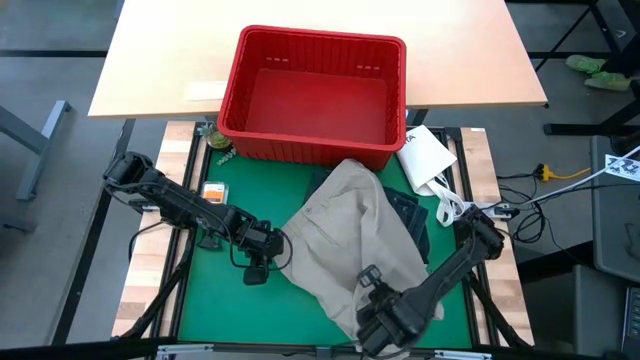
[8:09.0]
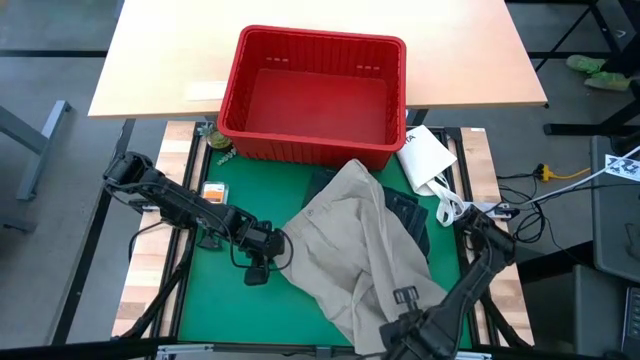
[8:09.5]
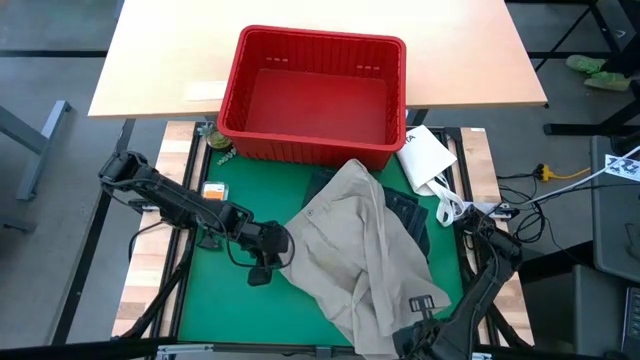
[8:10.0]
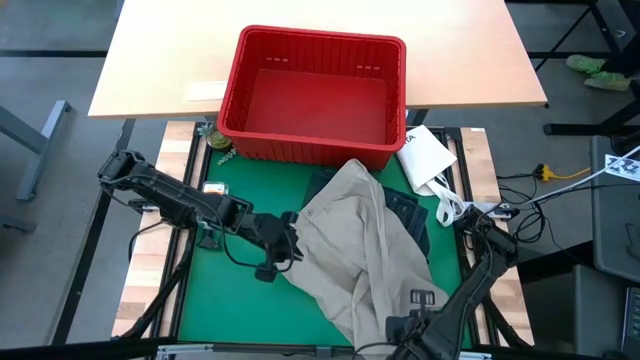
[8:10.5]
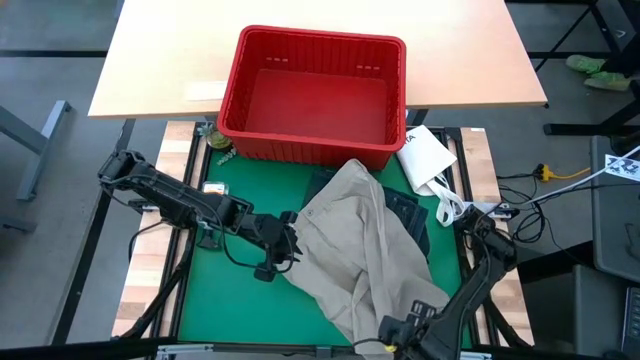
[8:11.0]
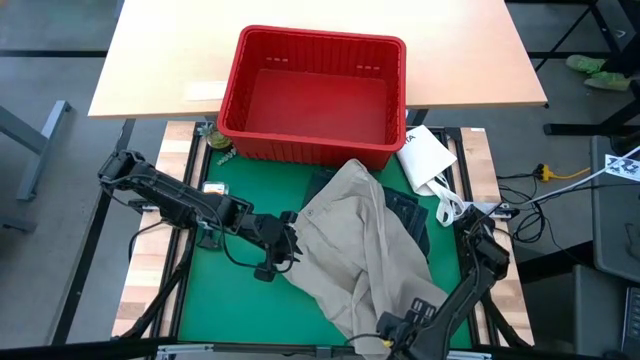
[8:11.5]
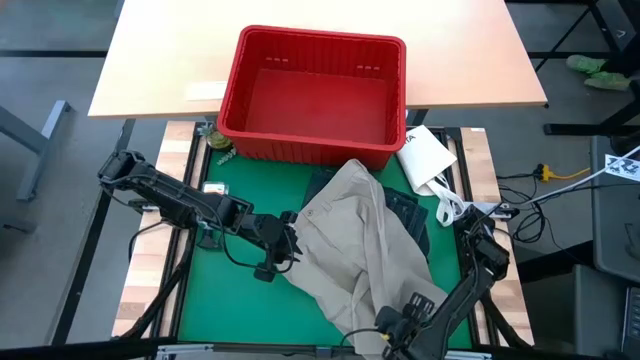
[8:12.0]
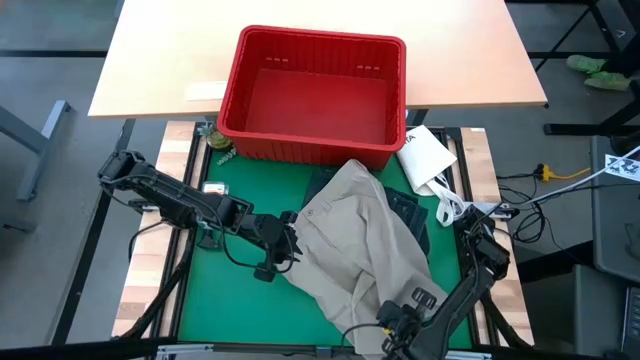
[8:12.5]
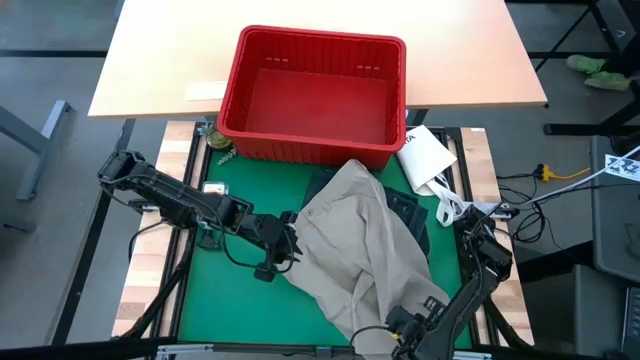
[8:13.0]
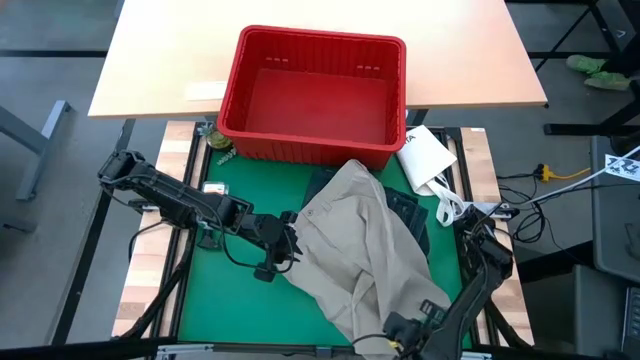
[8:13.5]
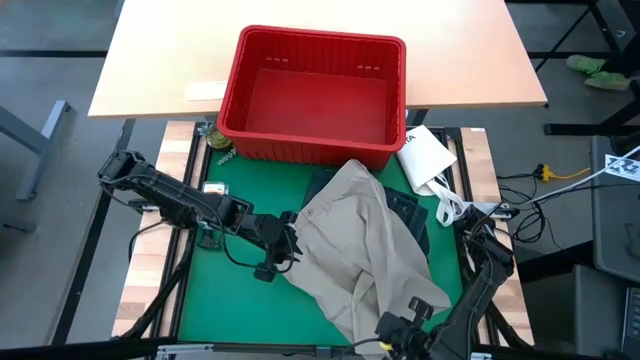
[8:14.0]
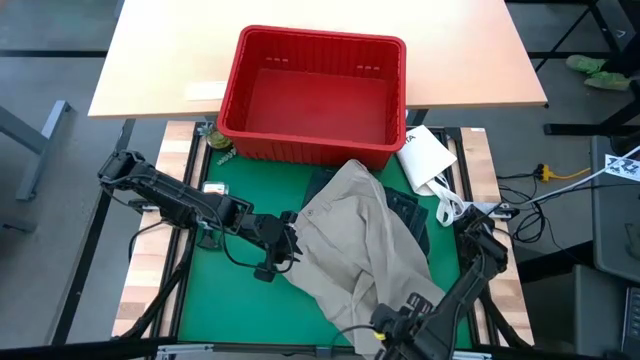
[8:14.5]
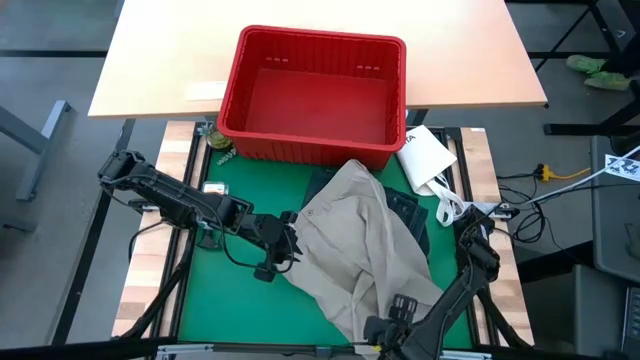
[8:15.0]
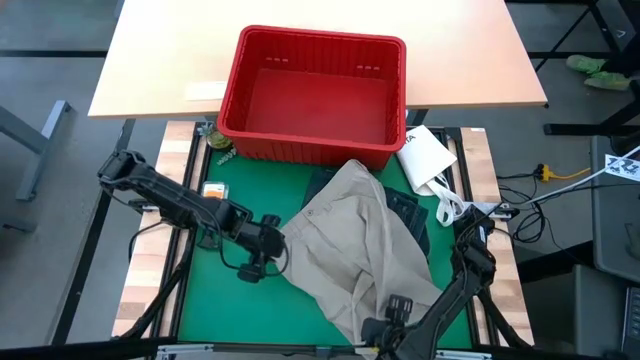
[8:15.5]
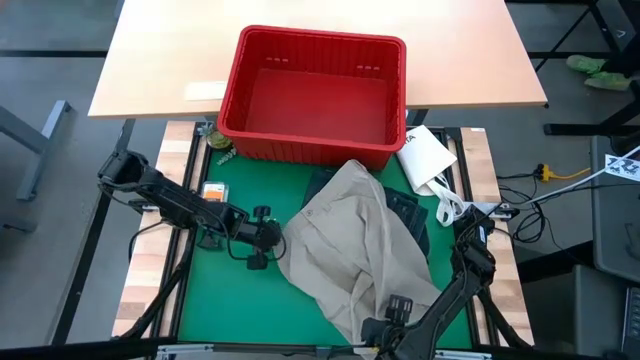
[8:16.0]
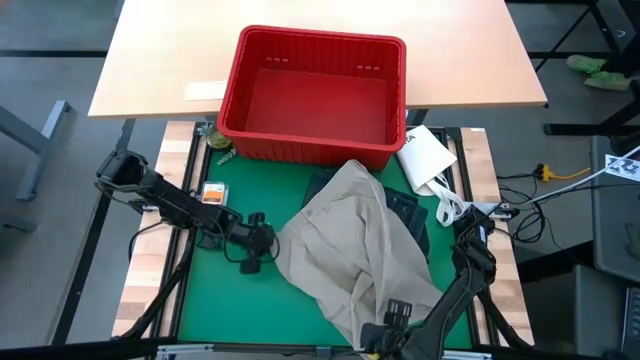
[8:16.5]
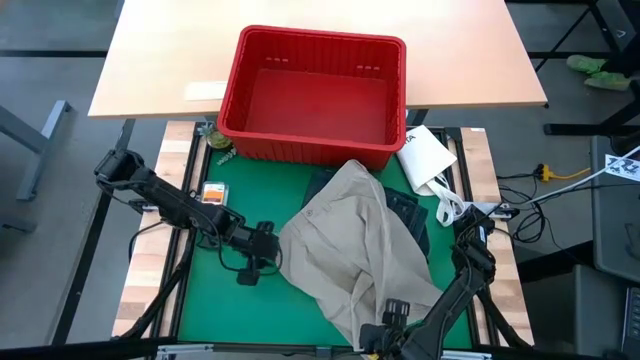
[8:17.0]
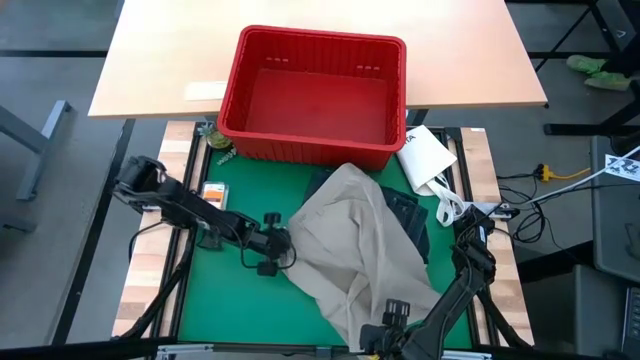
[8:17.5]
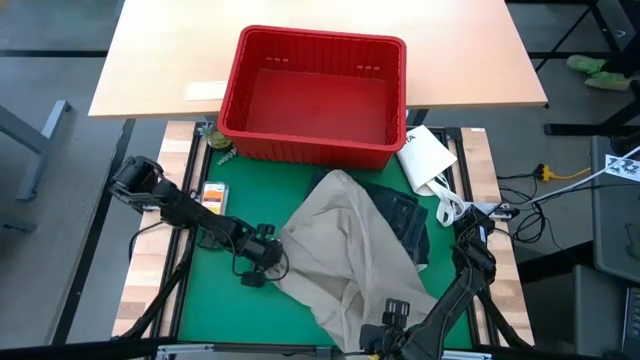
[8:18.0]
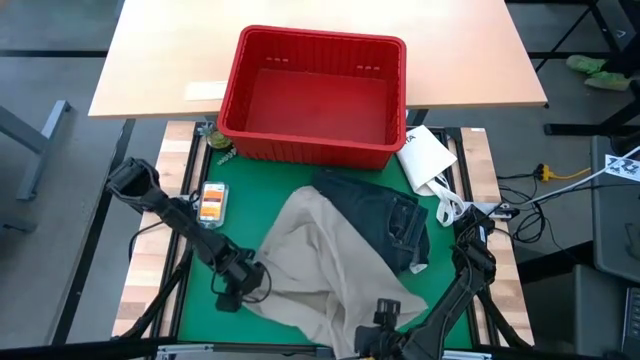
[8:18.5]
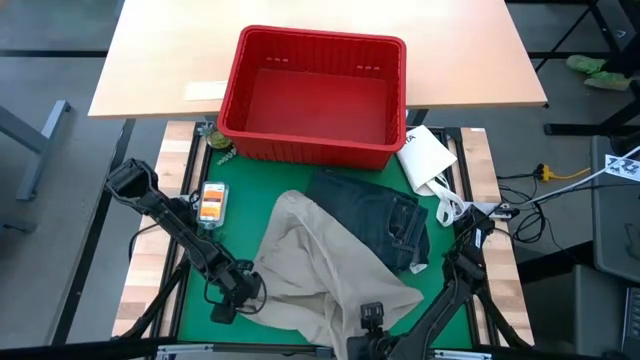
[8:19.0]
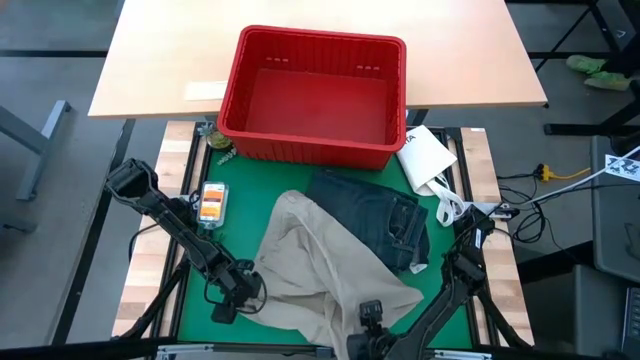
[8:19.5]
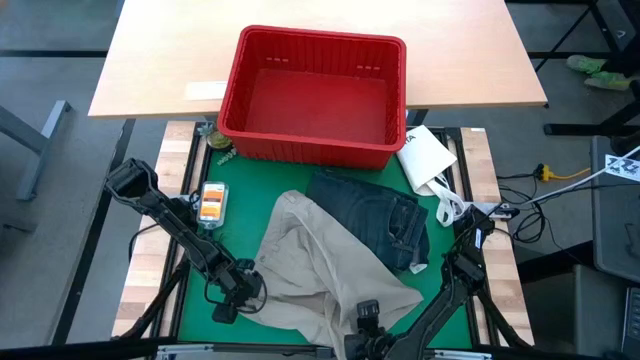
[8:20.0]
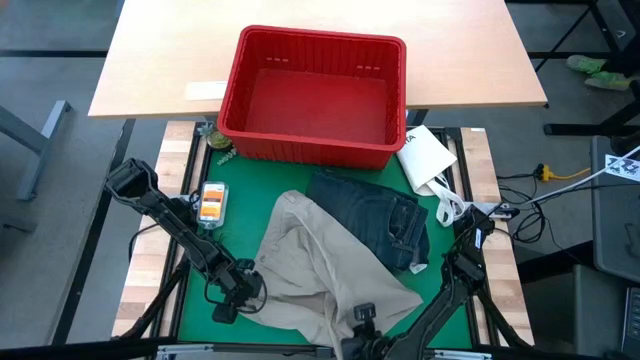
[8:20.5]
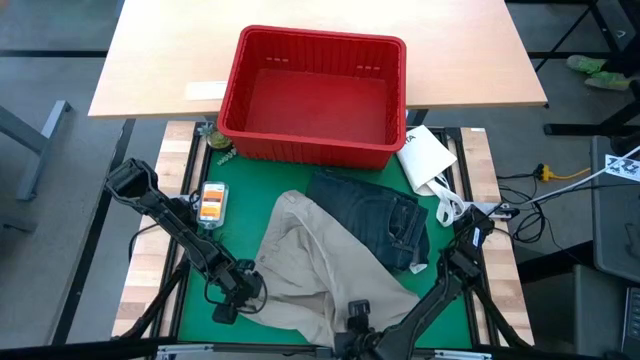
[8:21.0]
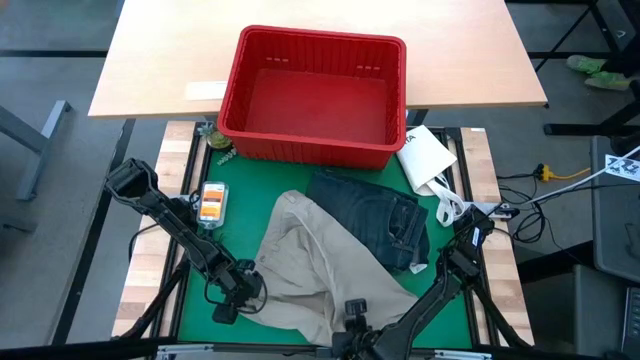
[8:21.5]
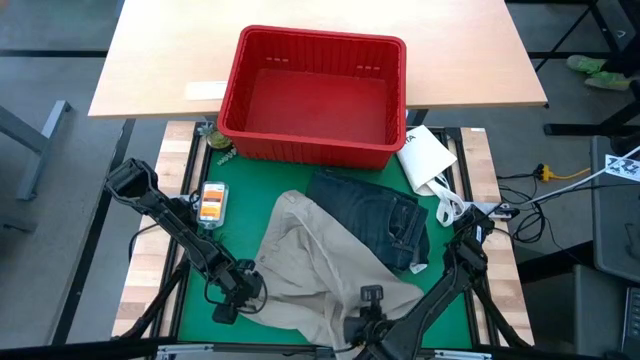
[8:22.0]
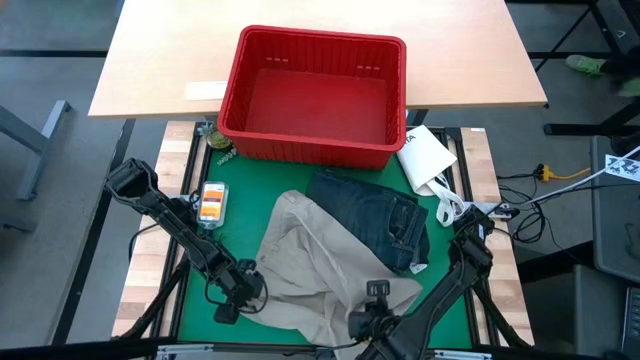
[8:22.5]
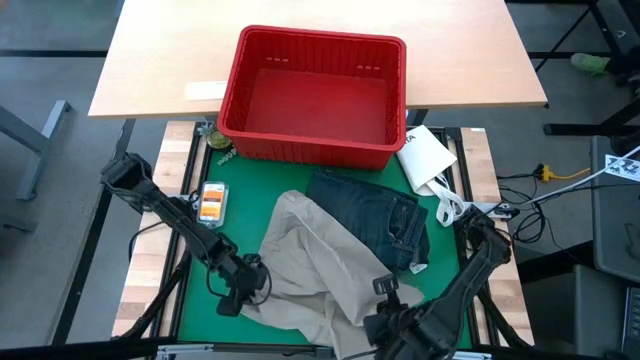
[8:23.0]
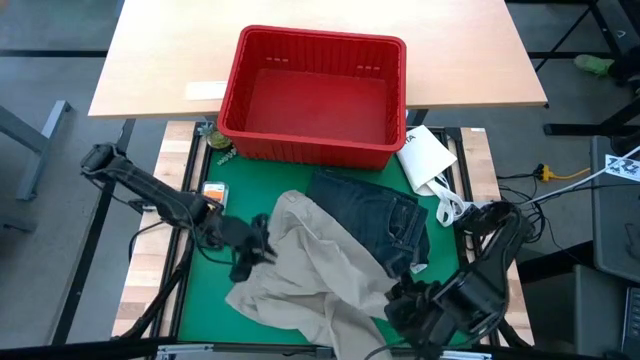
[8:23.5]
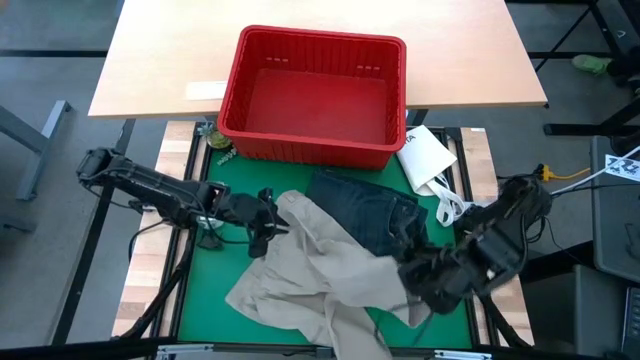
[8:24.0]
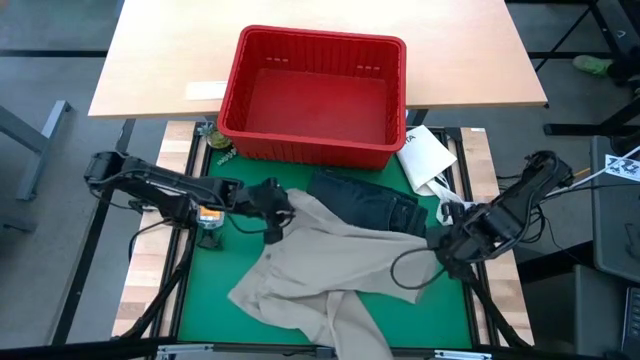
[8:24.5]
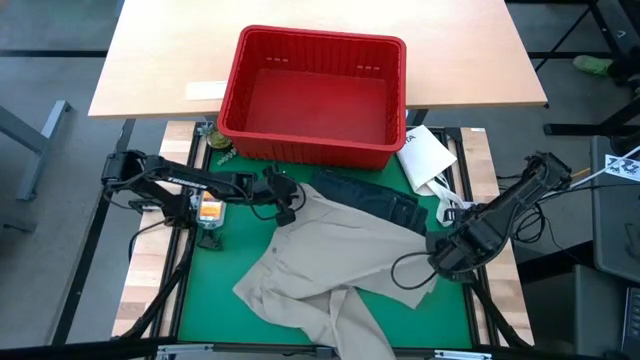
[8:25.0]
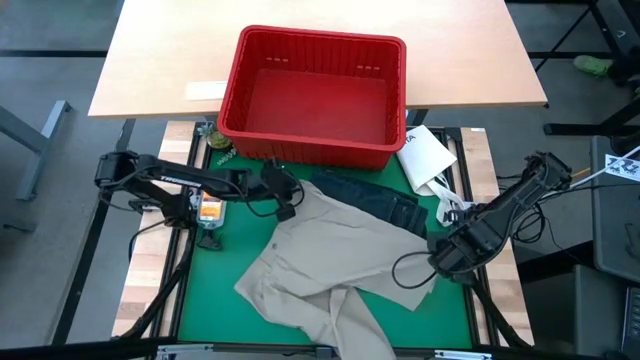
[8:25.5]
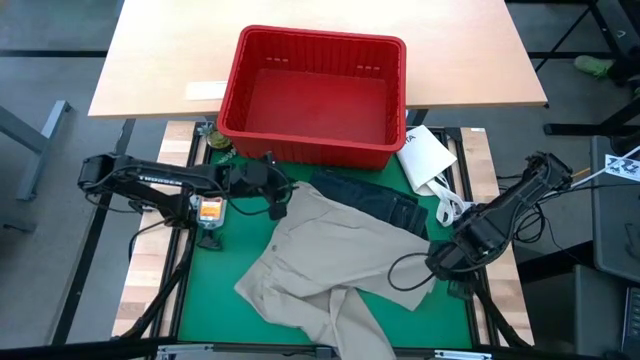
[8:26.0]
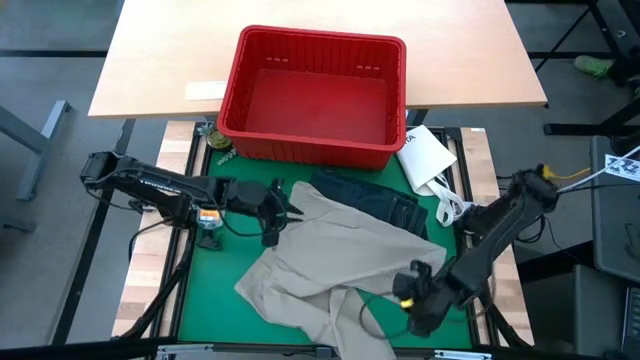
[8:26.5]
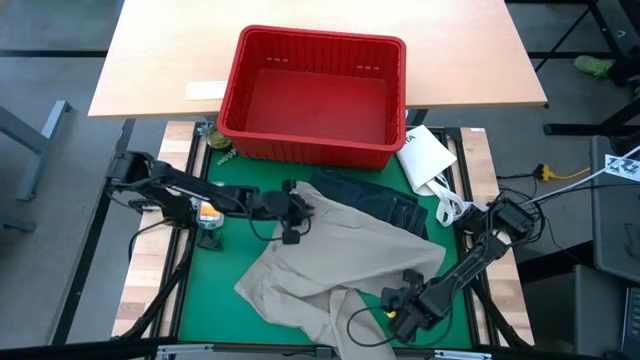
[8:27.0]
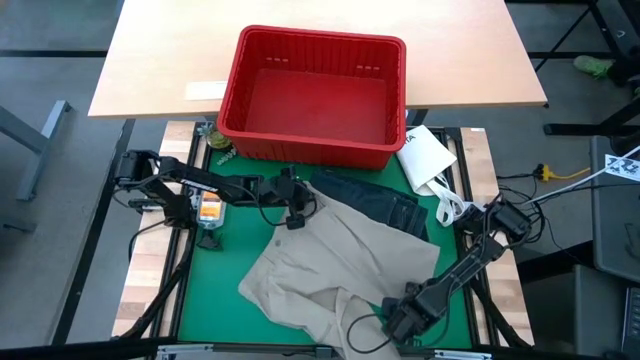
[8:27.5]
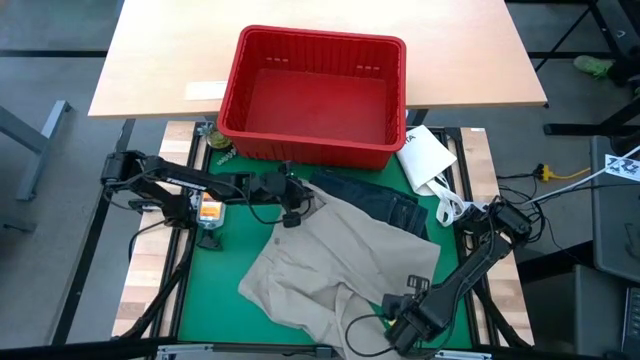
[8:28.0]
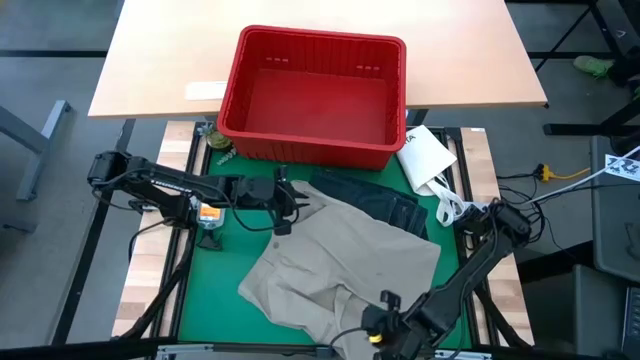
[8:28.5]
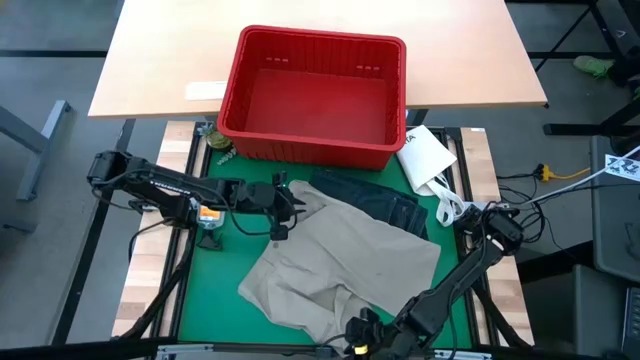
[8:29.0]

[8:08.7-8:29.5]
Task: Fold Laundry from Bin
Fold the gray shorts
